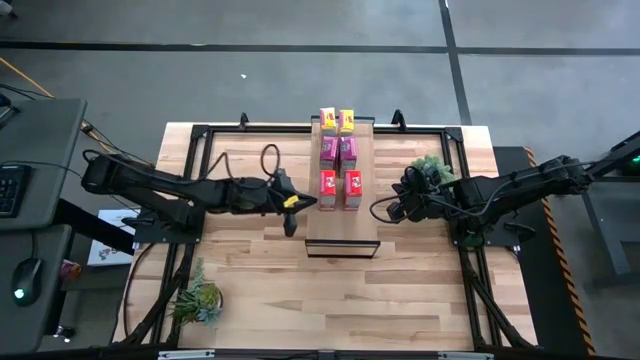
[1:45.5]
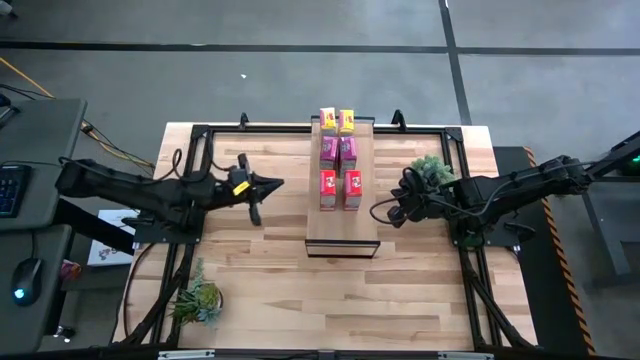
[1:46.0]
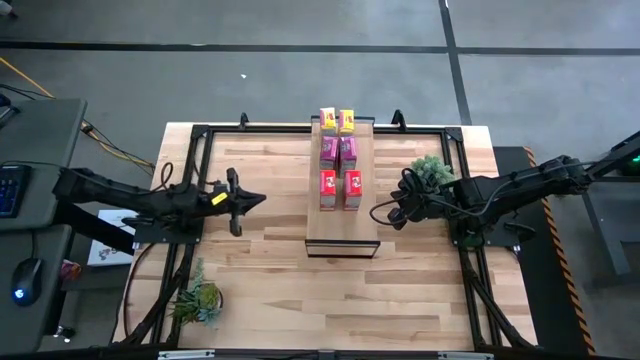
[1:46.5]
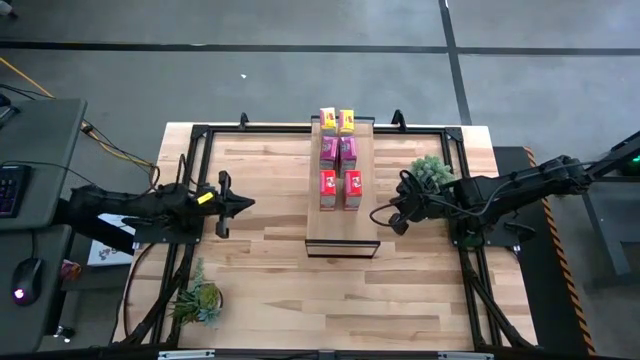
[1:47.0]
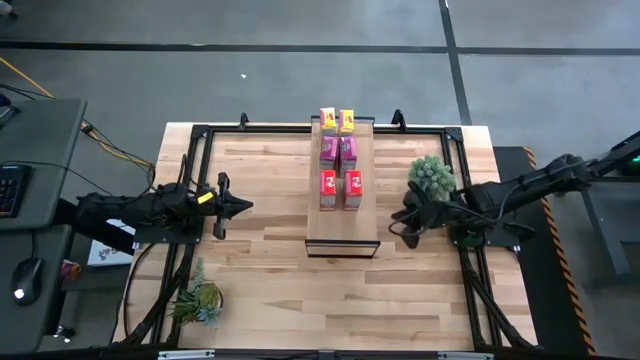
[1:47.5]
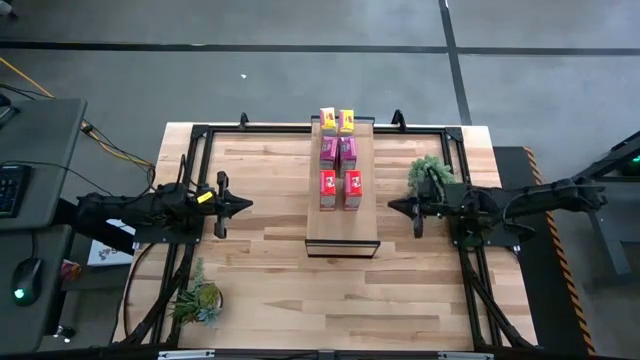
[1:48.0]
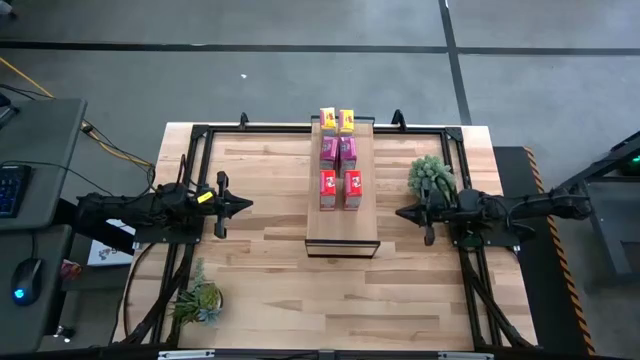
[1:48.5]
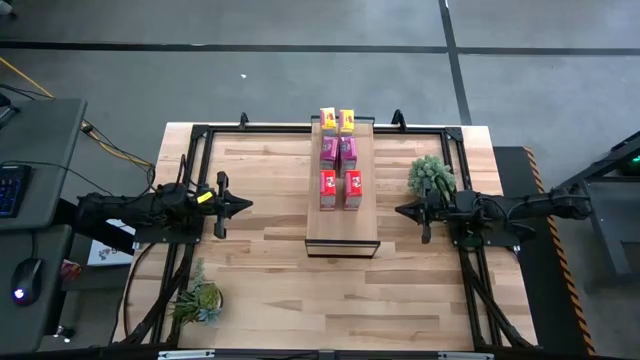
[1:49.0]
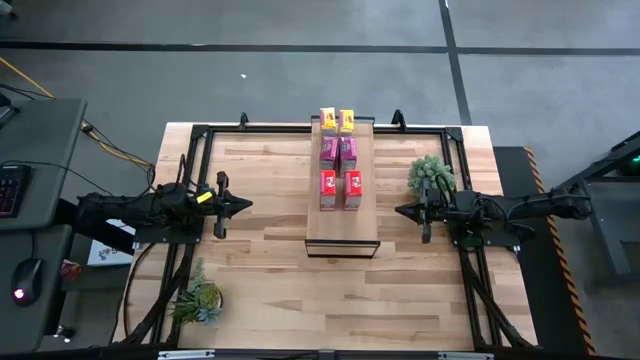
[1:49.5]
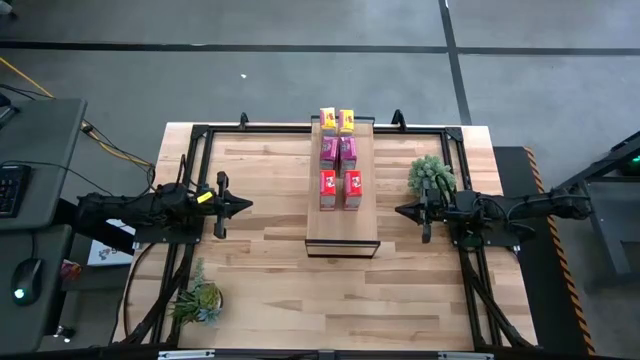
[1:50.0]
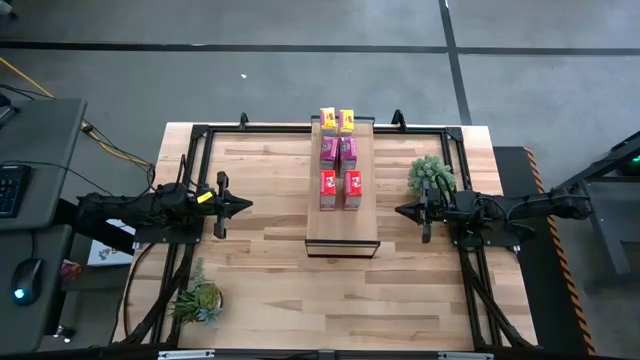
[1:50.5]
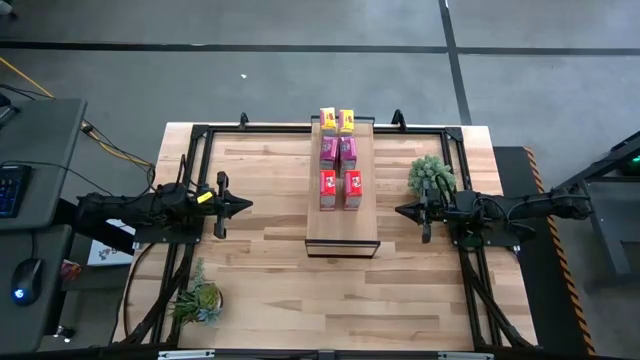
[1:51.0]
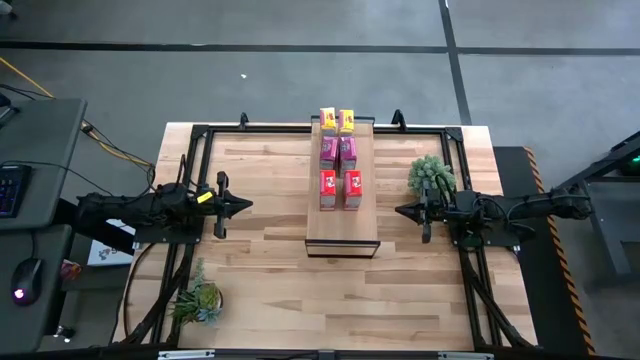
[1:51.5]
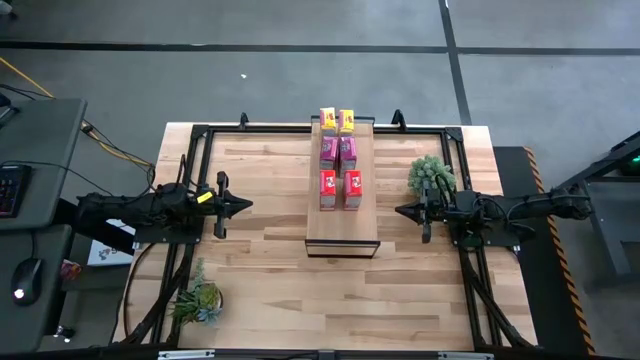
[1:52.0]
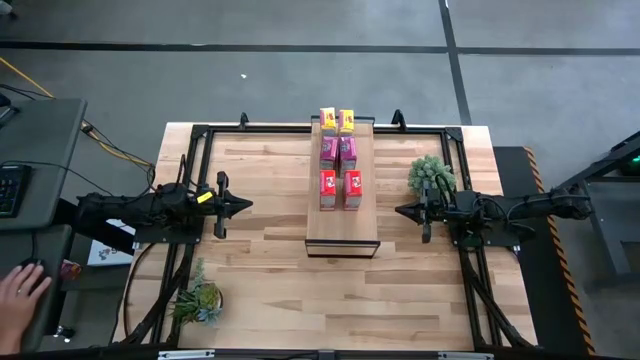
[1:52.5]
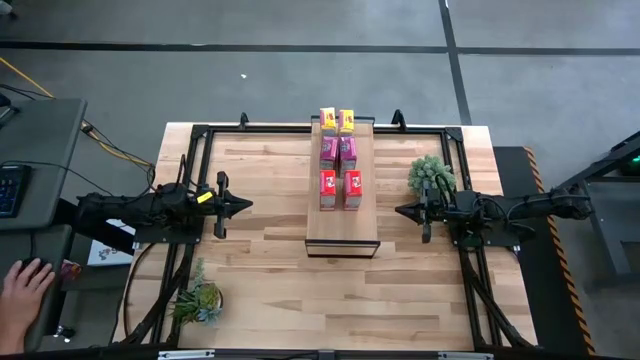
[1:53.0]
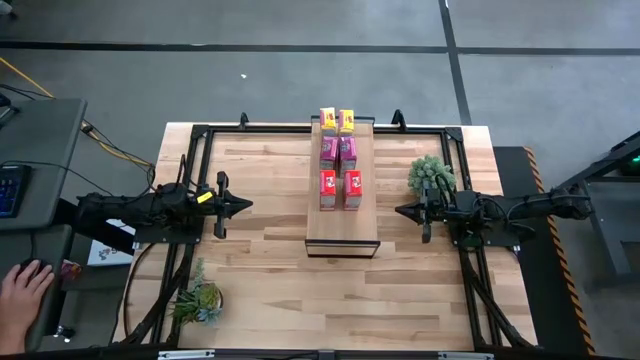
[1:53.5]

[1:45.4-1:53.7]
Task: Stack cereal on shelf
Return to Home Position

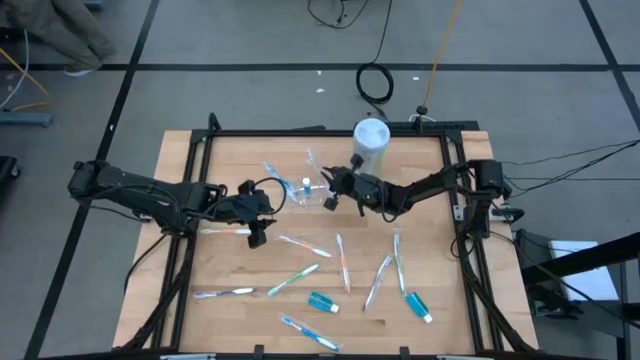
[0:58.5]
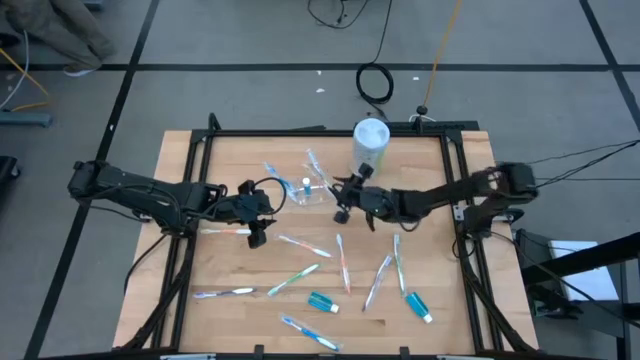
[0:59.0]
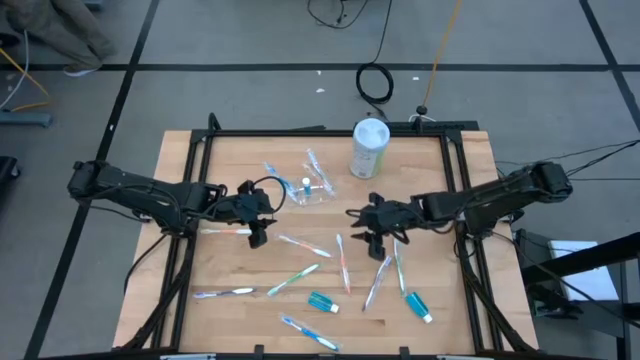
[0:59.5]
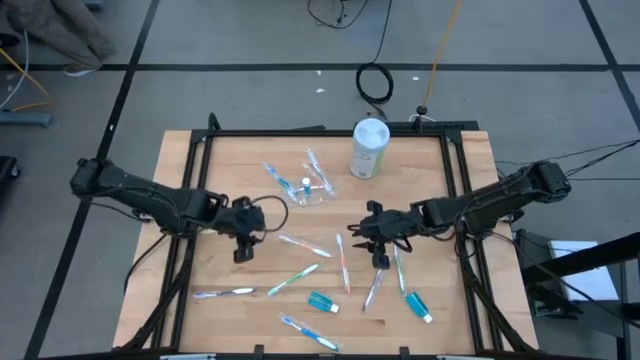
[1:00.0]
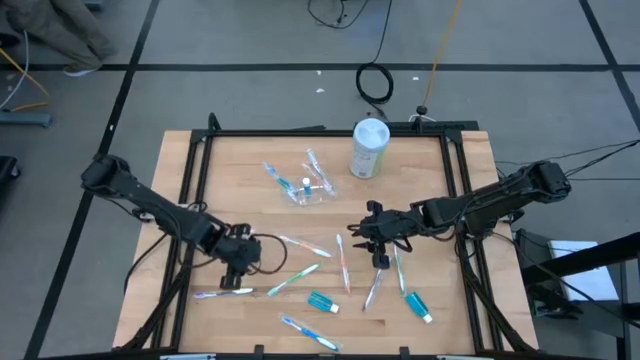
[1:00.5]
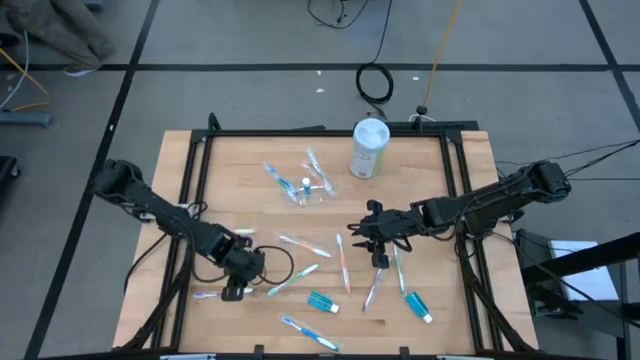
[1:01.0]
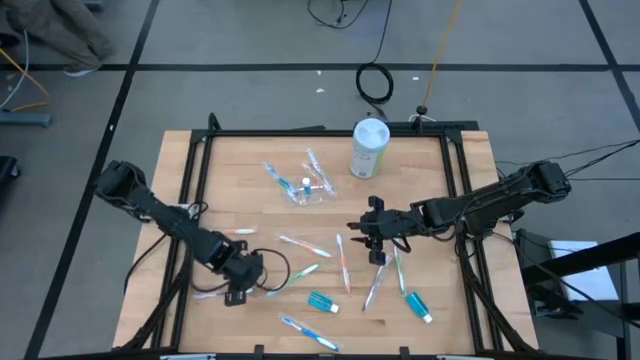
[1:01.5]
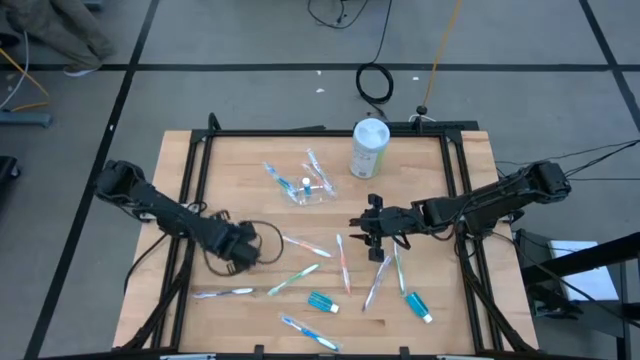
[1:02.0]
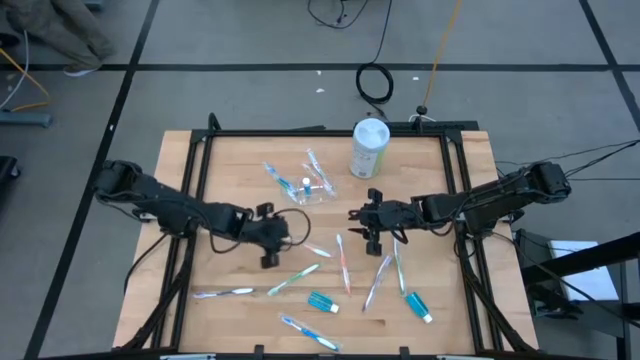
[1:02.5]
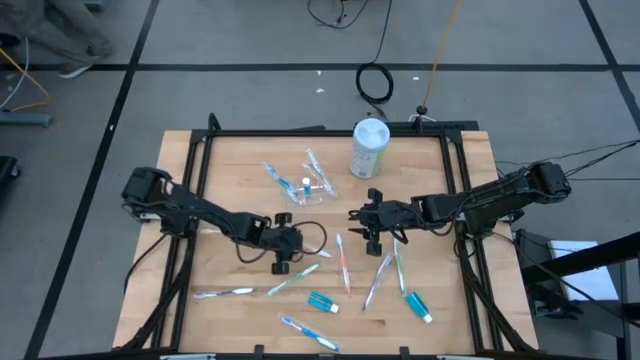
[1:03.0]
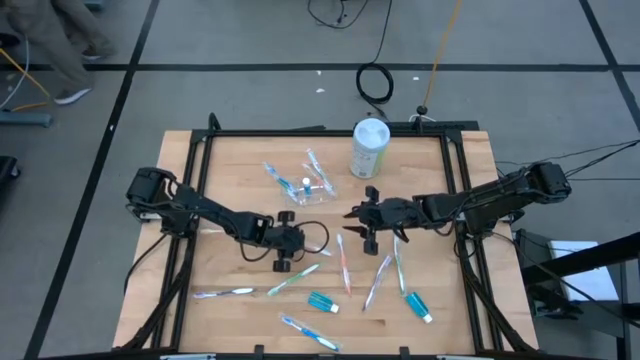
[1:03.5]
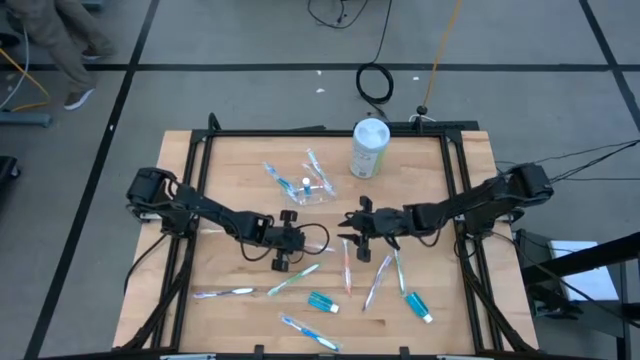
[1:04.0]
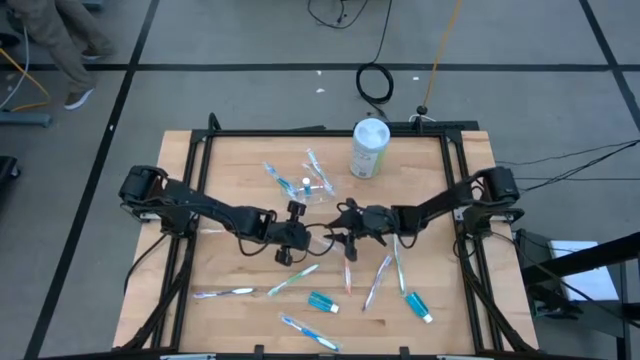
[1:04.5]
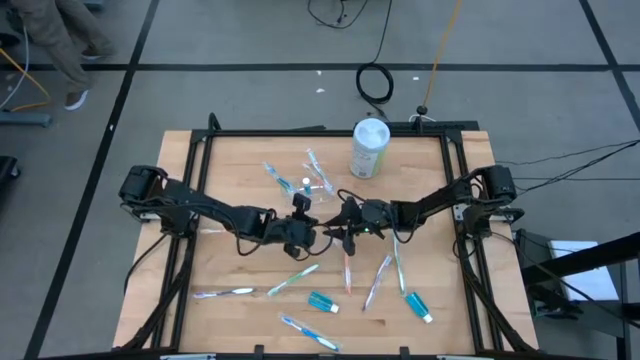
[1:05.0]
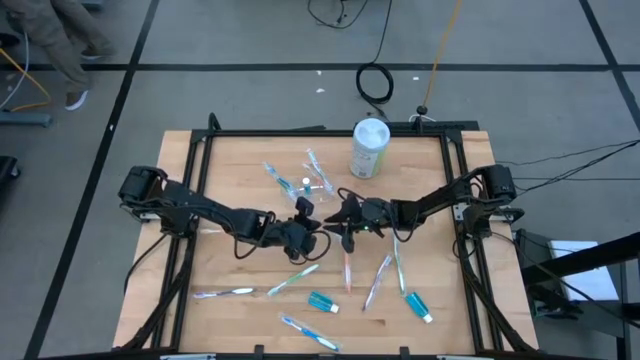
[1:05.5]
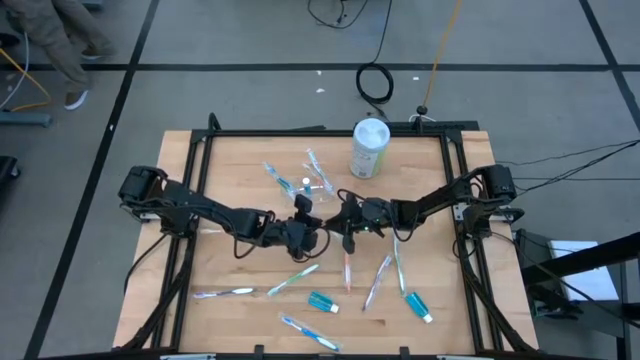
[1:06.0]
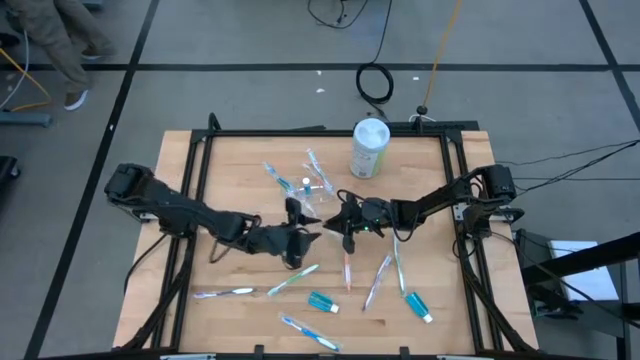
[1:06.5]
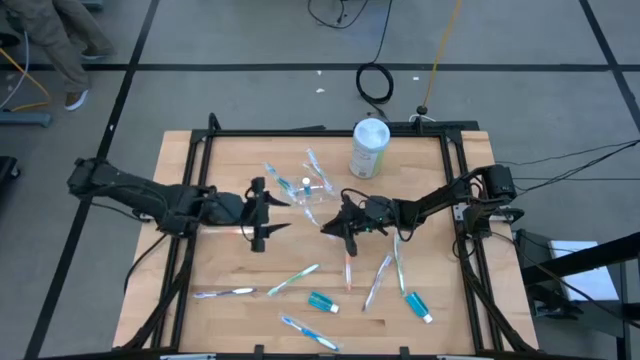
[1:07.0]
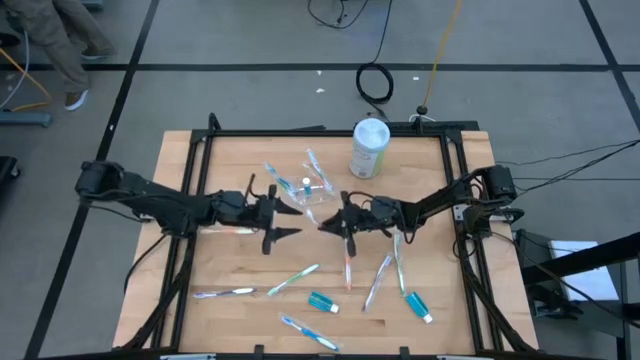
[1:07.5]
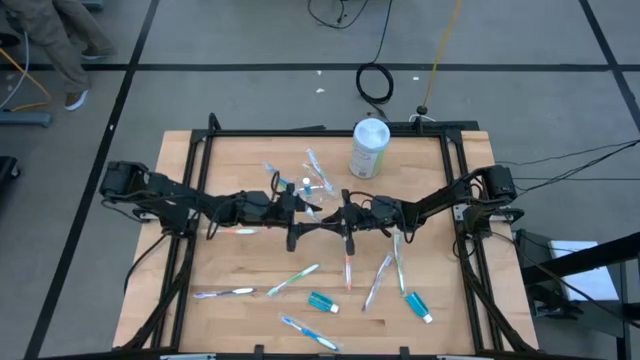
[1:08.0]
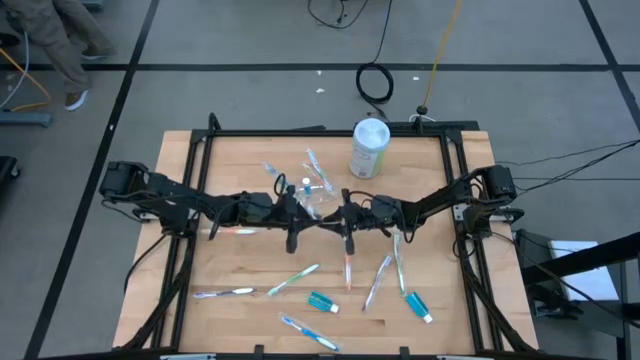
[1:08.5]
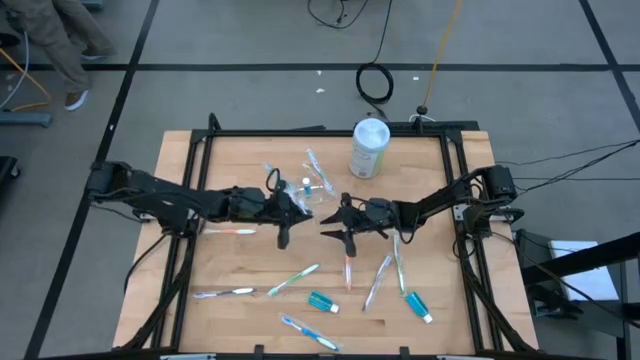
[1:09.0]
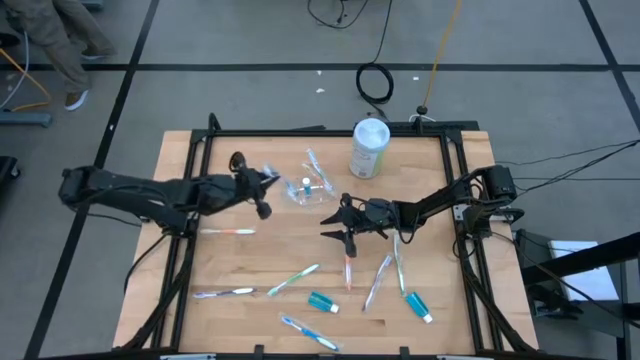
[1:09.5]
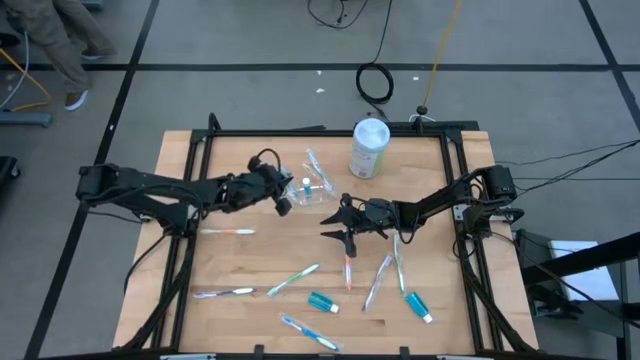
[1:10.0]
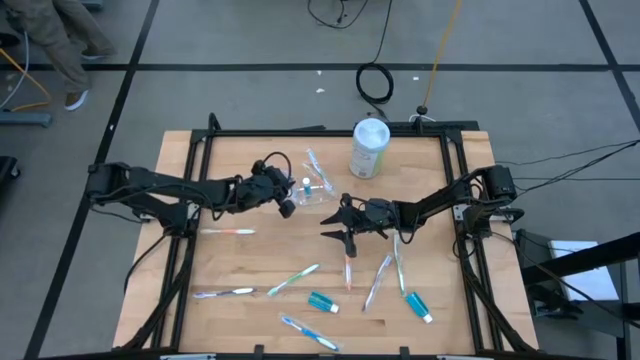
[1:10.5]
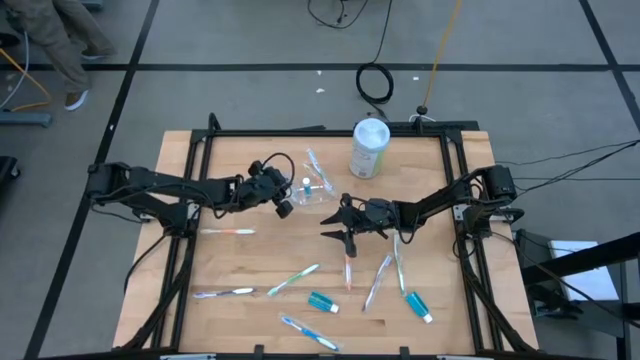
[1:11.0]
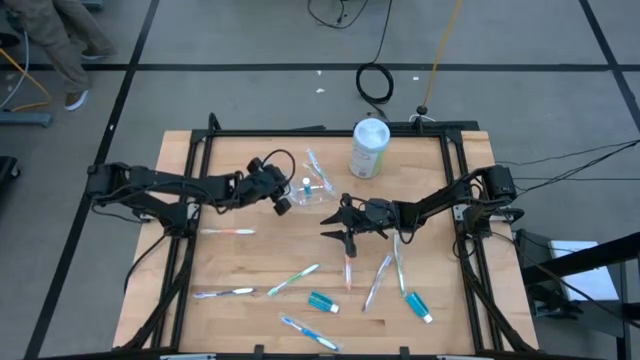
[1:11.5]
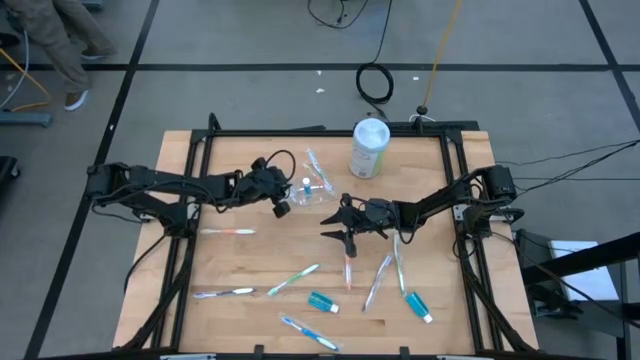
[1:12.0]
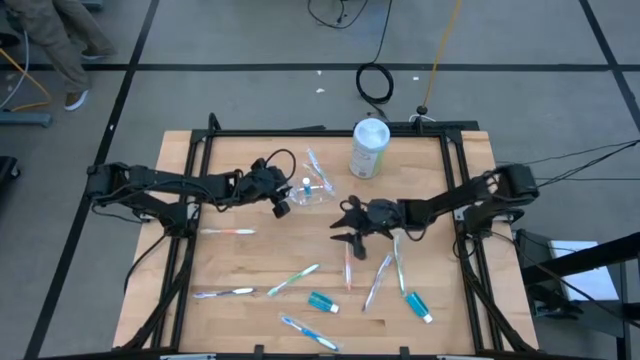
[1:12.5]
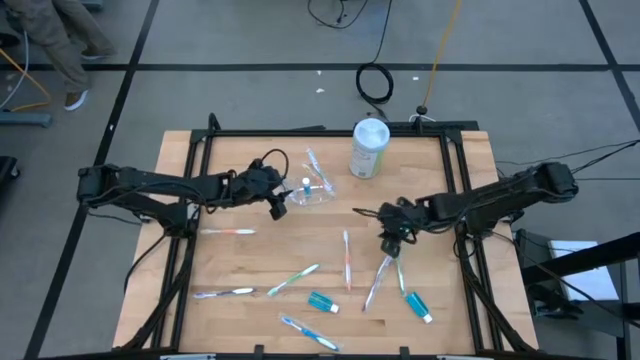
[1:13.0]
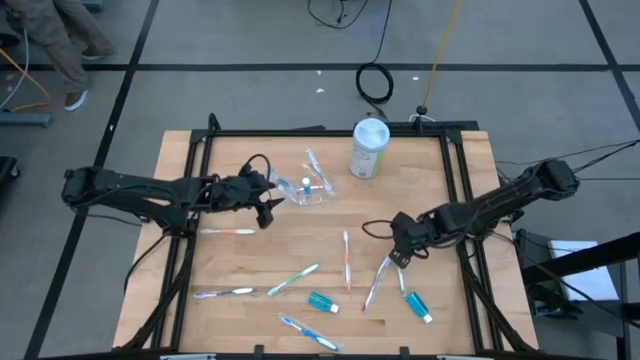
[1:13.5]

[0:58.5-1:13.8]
Task: Pick & Place toothbrushing station
Put the orange toothbrush into the transparent organizer
